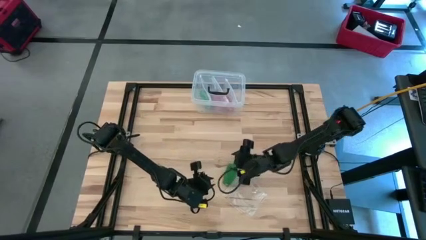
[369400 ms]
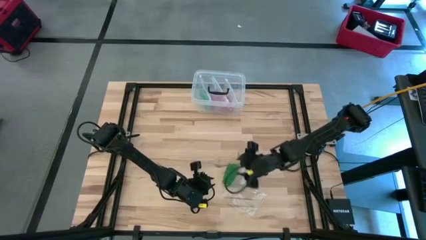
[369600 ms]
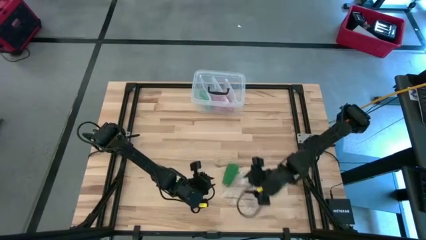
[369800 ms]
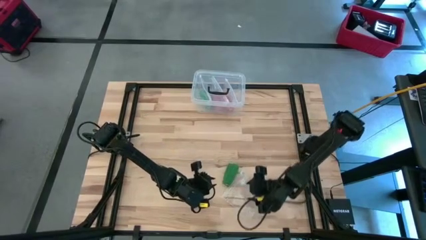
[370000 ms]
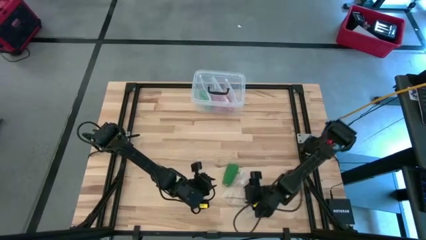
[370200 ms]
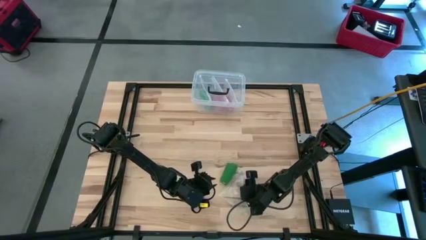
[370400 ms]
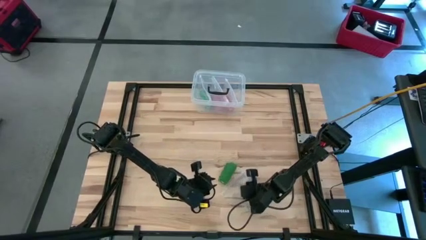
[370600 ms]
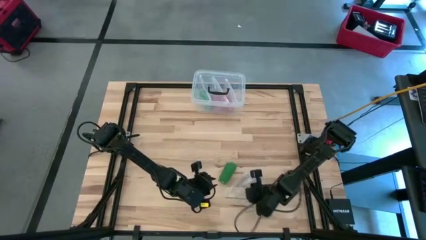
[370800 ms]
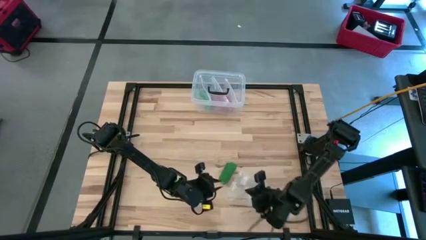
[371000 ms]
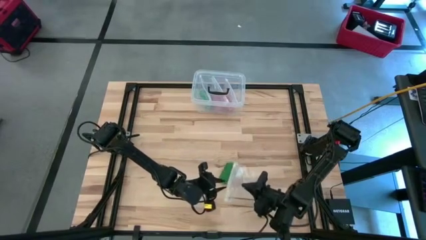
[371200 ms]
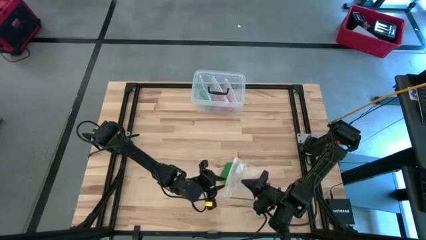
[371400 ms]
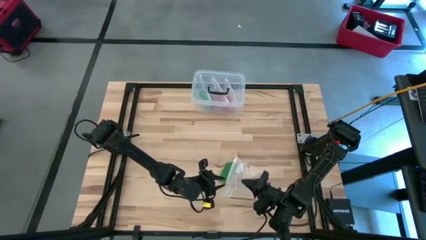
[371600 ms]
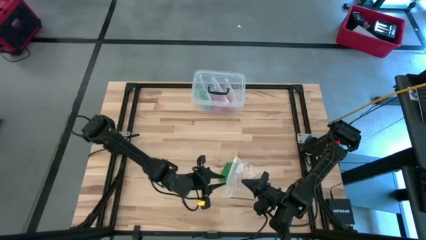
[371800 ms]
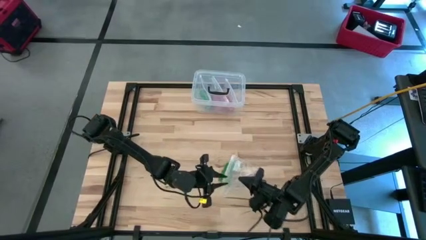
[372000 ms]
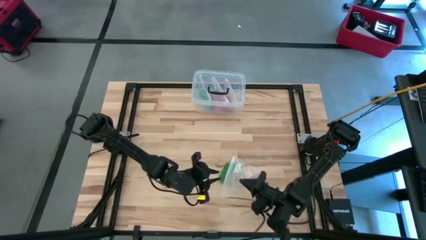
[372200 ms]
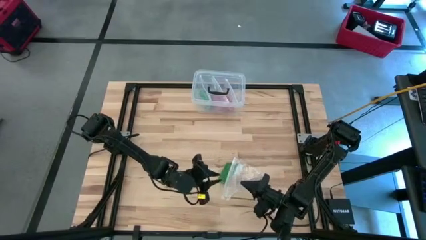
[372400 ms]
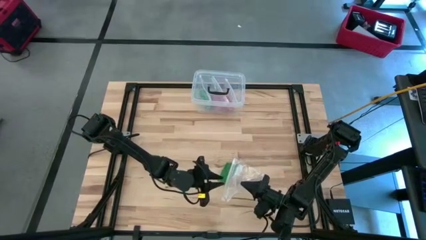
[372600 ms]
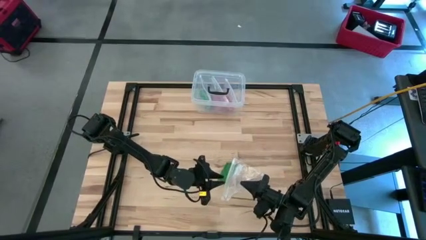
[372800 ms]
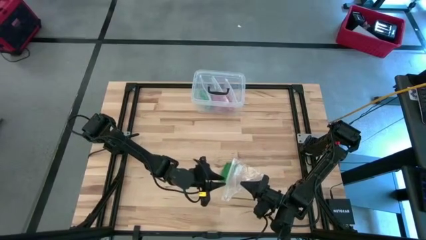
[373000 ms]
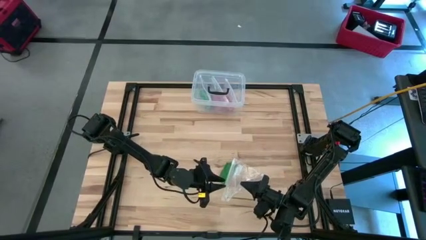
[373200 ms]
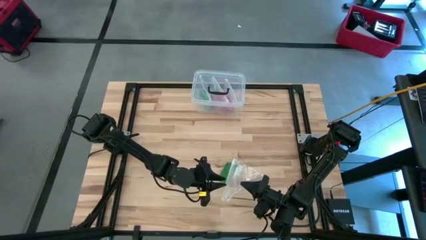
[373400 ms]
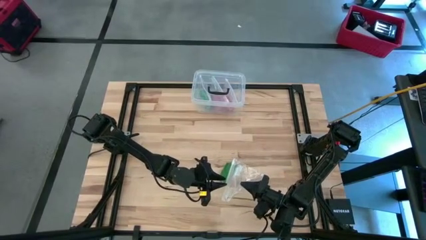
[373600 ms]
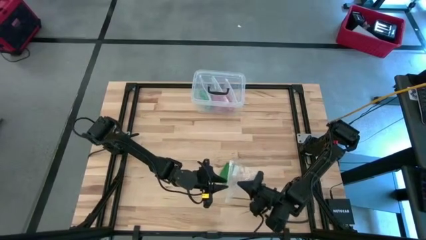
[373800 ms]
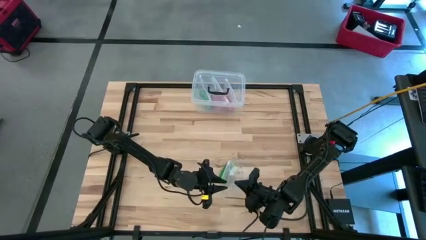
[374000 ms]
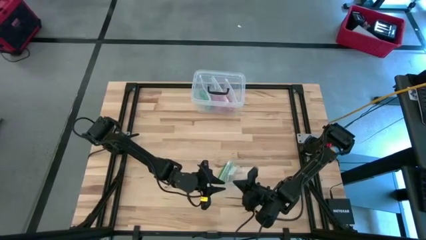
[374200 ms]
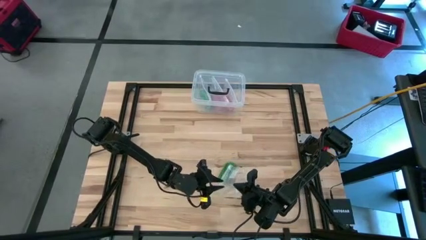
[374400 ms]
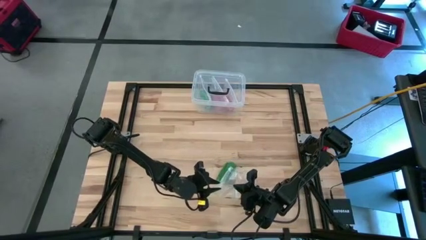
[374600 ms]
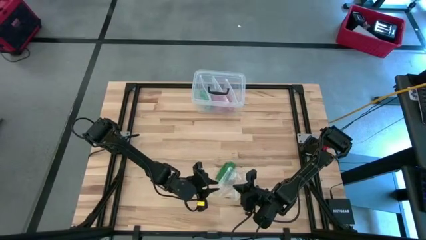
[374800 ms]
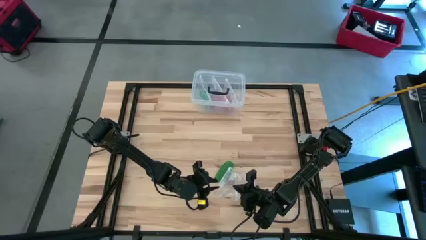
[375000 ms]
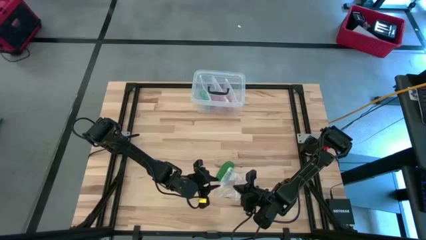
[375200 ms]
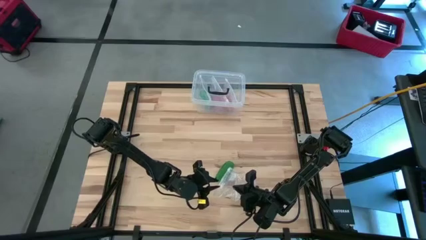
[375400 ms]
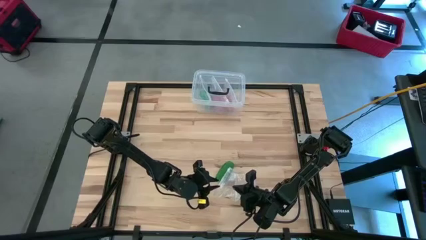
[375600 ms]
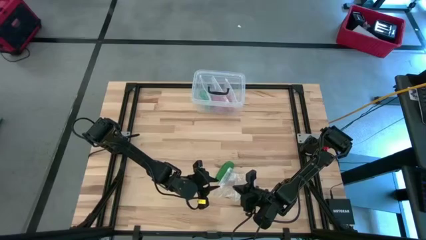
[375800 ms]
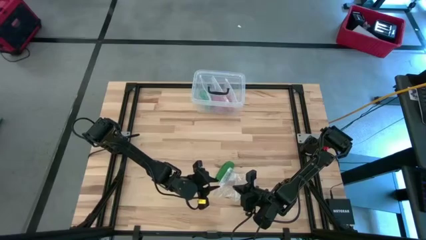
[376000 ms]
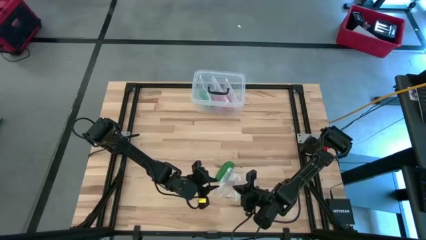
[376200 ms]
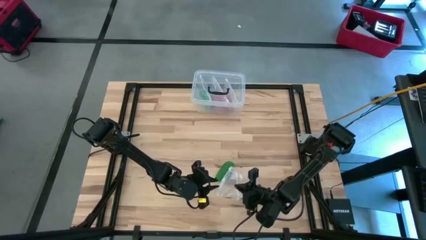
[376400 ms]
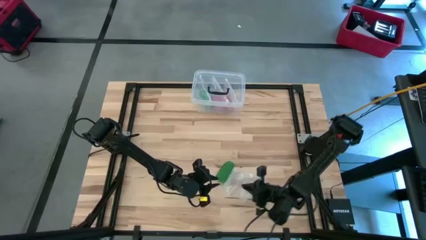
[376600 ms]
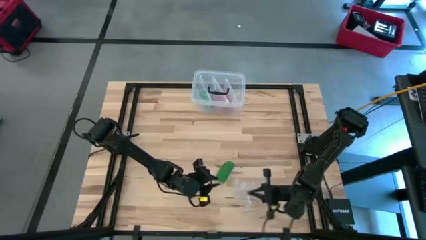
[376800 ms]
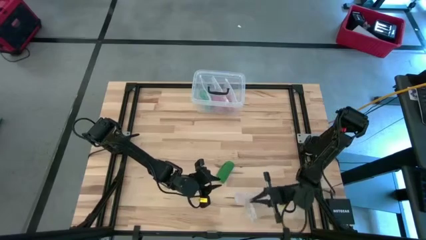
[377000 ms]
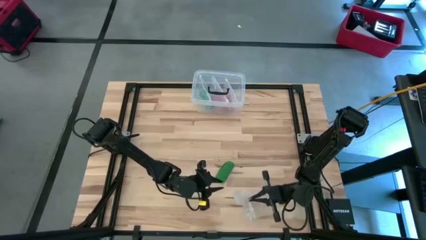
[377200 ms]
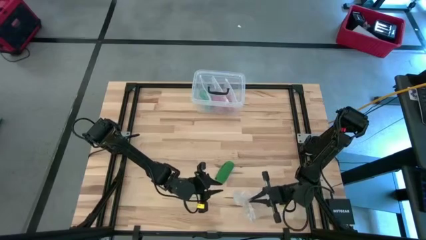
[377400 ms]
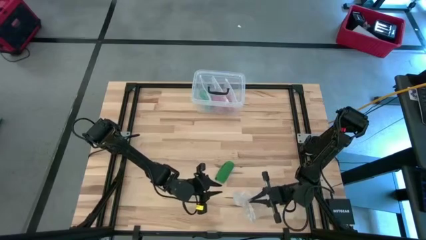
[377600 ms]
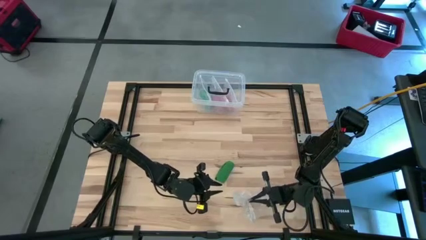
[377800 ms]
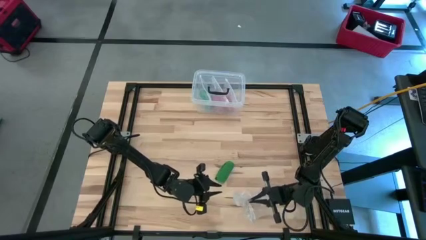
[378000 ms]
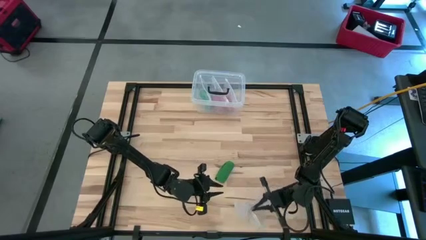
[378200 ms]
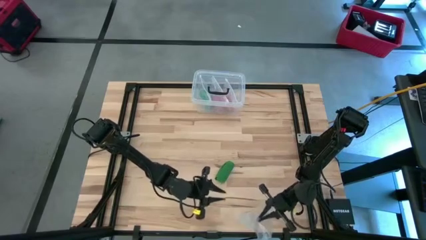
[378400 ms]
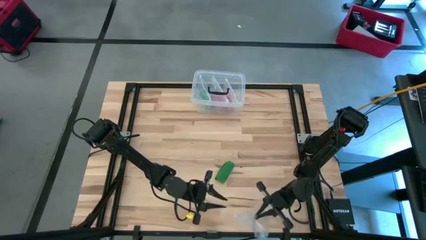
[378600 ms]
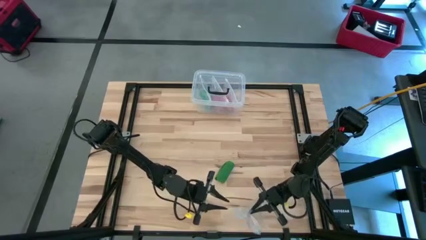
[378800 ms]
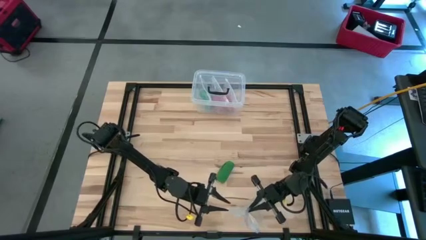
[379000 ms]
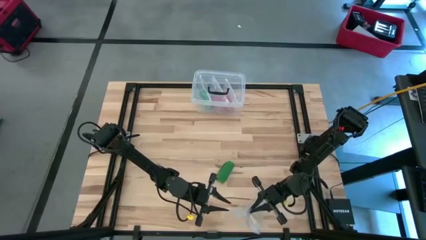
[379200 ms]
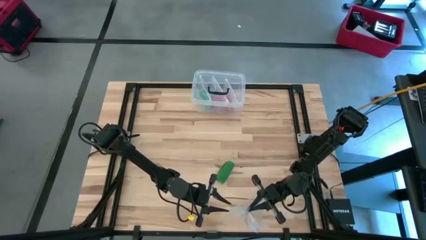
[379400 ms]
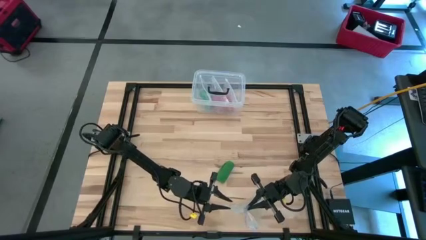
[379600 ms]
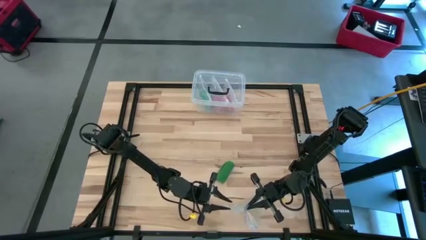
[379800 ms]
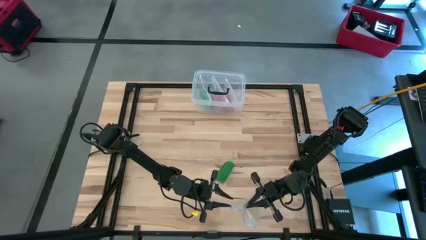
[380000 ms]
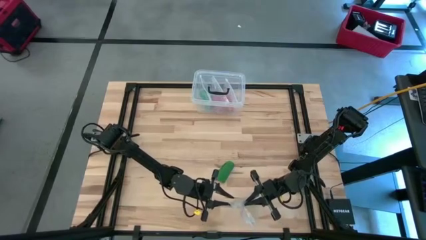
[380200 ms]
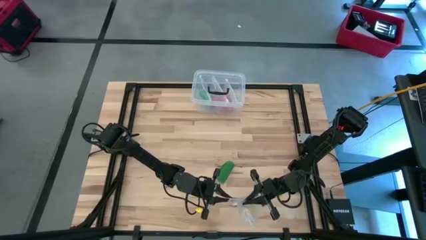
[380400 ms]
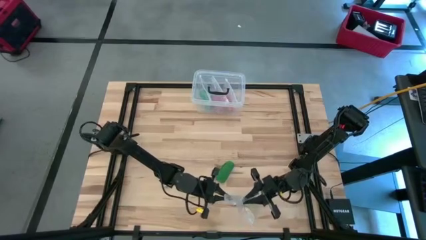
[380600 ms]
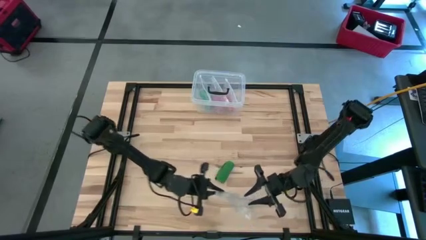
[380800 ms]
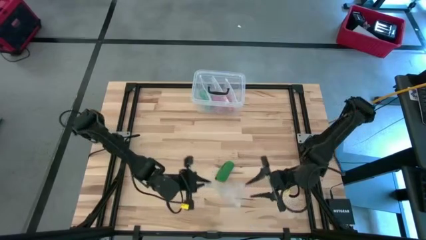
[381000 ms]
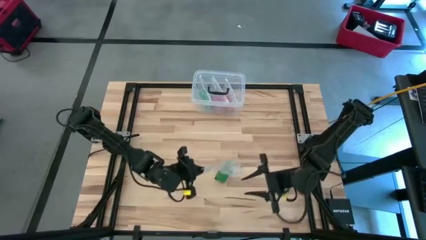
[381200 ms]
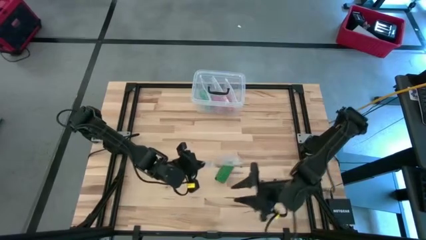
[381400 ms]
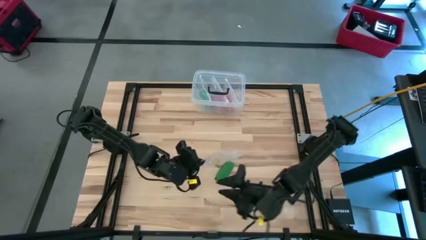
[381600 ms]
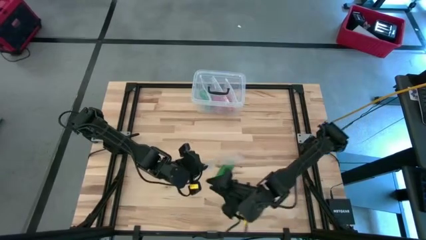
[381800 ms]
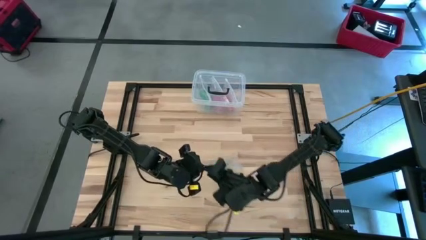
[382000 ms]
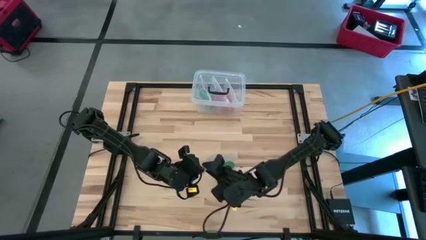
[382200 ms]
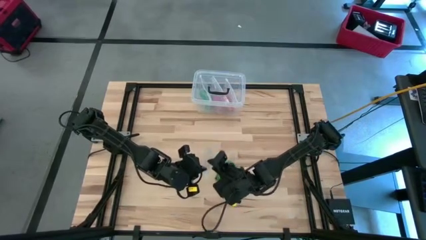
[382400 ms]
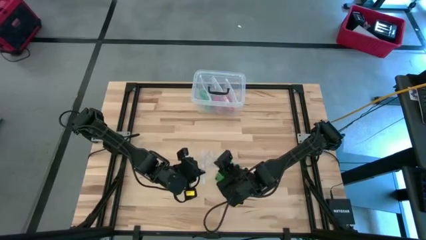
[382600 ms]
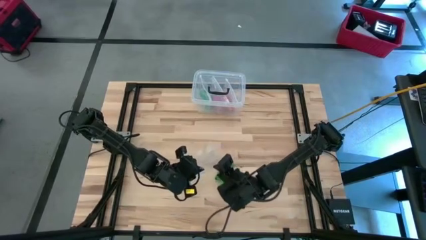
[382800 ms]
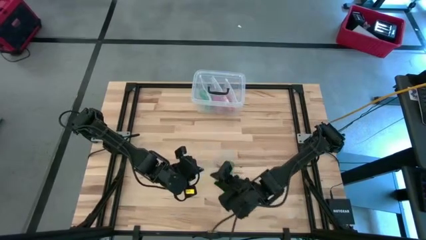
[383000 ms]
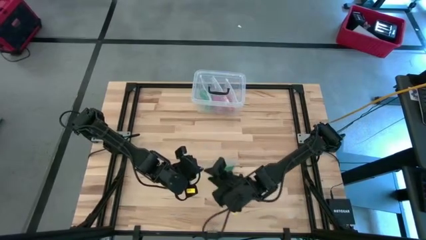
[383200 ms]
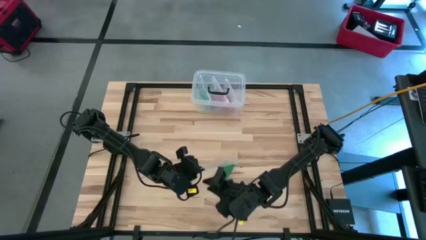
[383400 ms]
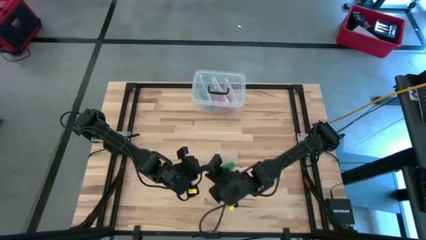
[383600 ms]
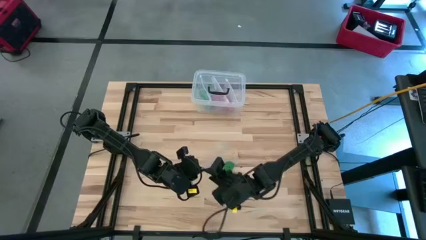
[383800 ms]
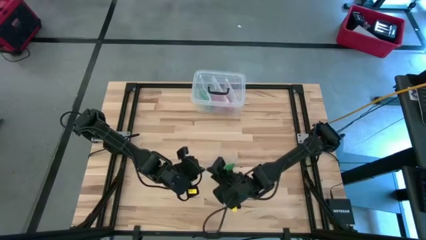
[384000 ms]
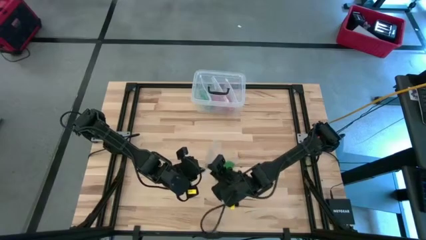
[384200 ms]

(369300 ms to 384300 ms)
Task: Roll bandage
Open the transparent zip lock bag

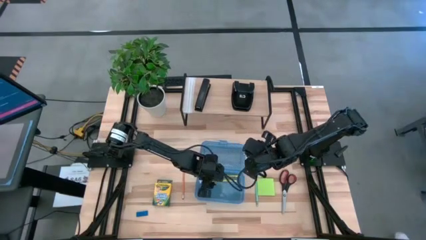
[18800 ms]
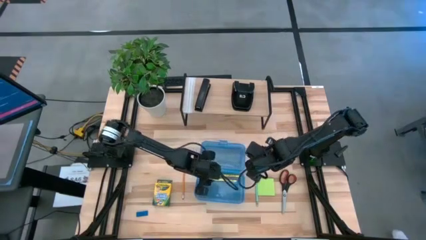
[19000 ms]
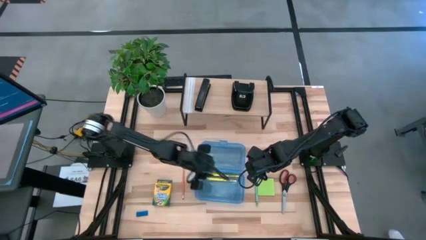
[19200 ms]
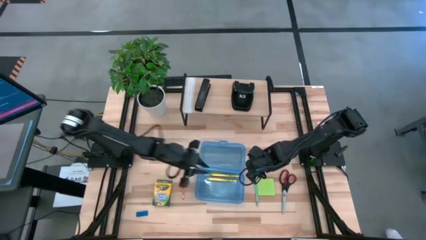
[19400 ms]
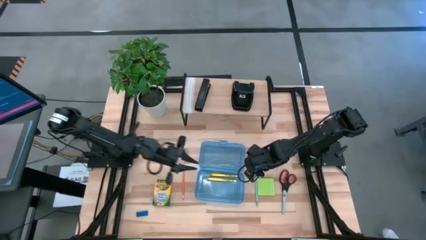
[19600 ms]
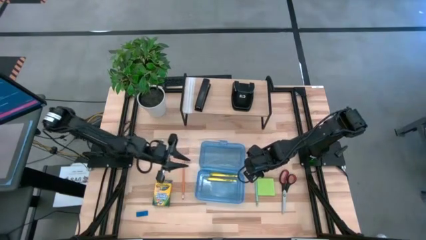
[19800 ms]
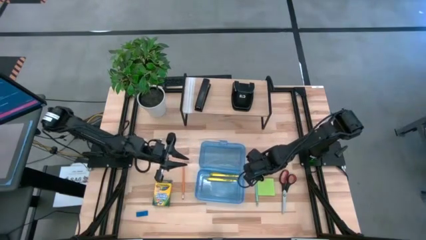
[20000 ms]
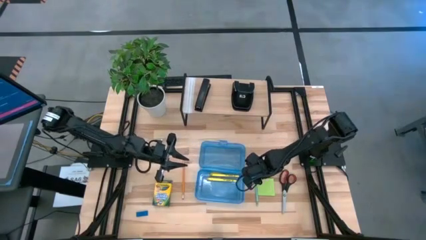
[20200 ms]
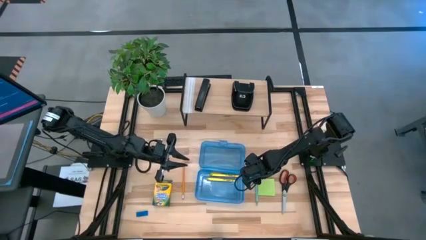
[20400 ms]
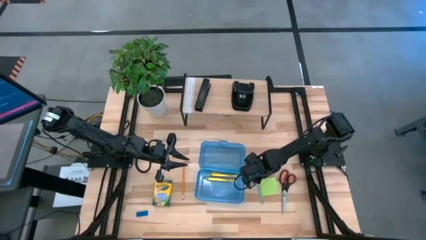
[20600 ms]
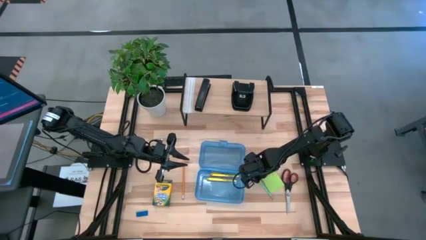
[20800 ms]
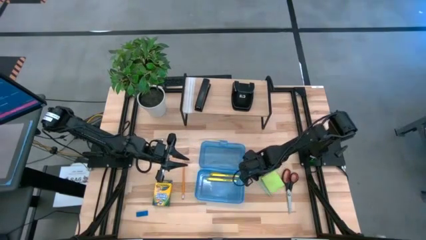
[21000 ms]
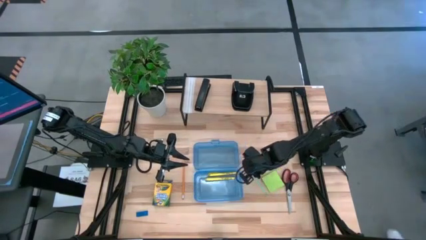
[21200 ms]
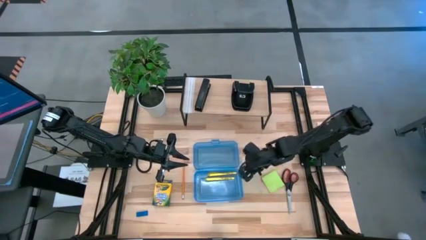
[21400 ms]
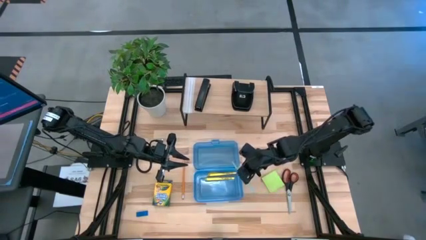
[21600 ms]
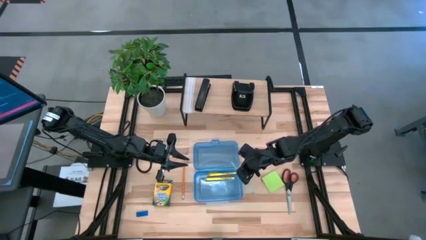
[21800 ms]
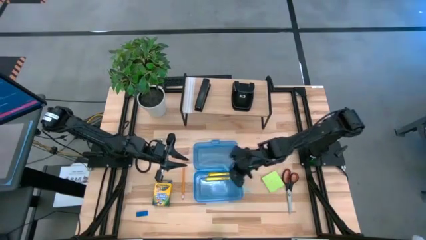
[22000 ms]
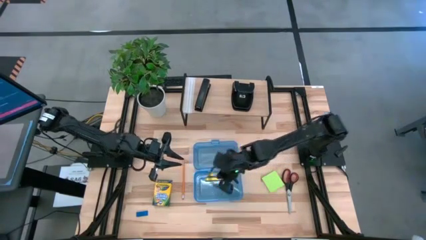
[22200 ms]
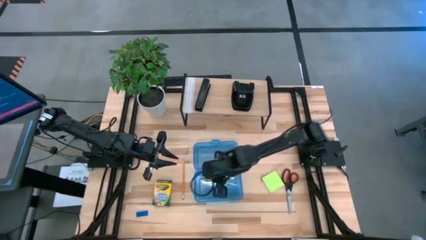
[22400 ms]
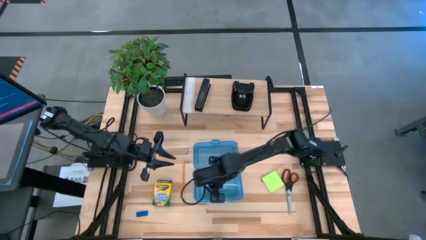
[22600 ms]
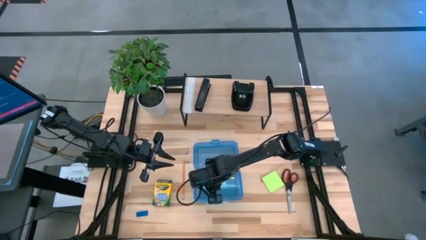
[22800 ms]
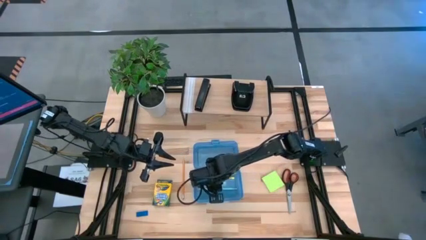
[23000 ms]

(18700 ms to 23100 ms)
Task: Pack school essentials
Put the green pencil into the blue supply box
